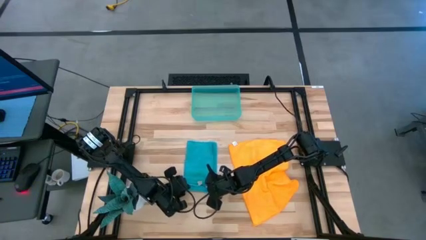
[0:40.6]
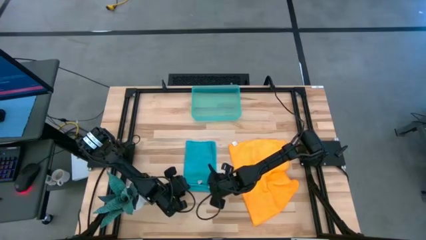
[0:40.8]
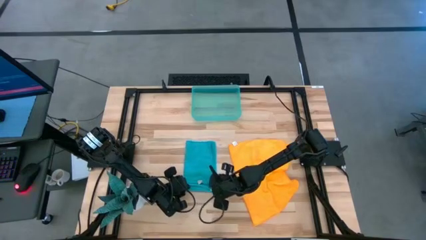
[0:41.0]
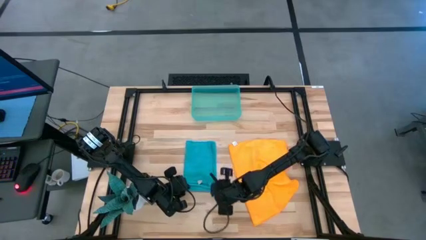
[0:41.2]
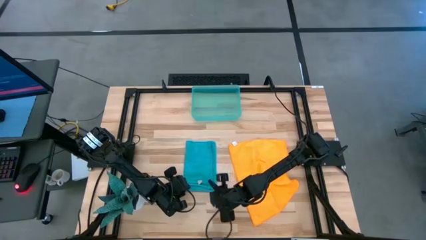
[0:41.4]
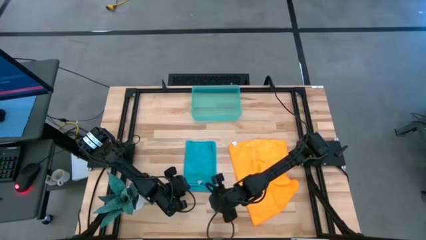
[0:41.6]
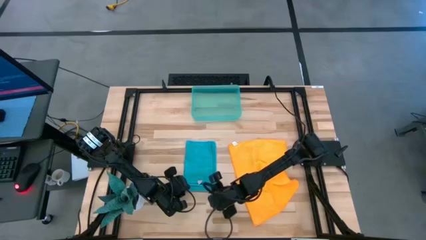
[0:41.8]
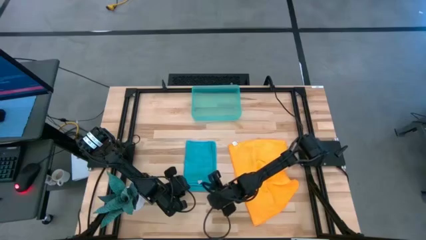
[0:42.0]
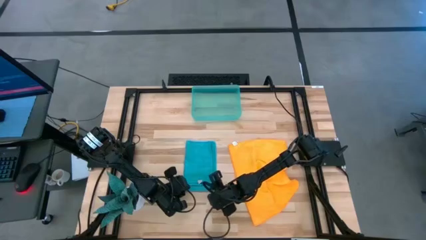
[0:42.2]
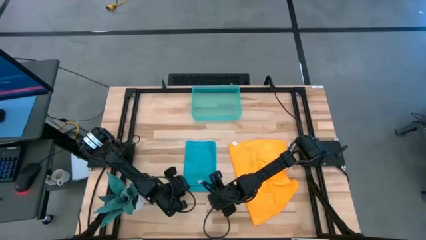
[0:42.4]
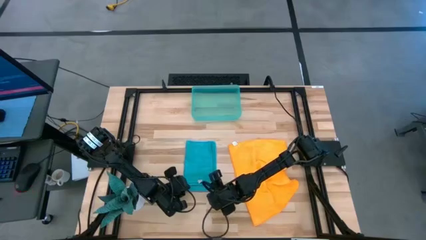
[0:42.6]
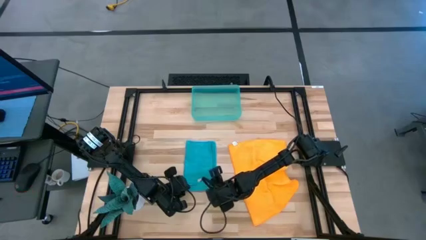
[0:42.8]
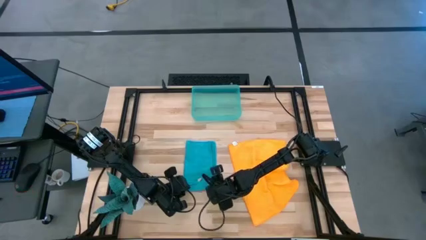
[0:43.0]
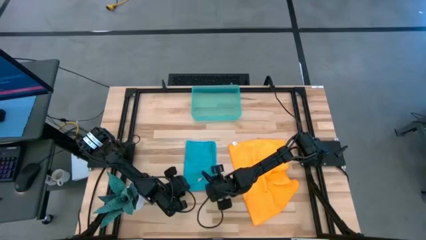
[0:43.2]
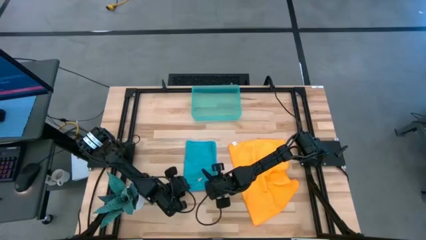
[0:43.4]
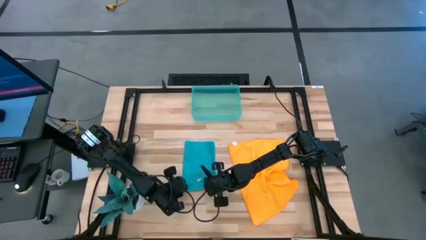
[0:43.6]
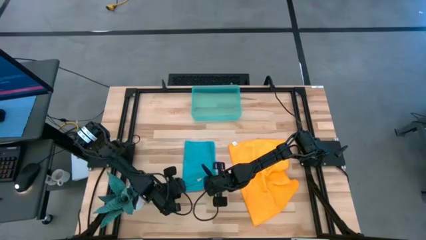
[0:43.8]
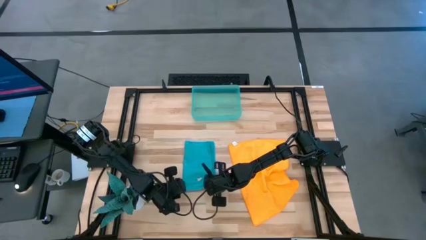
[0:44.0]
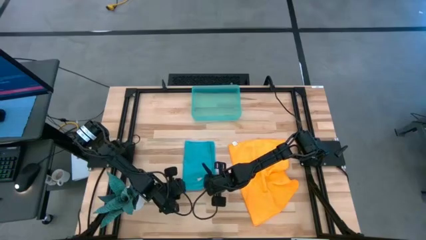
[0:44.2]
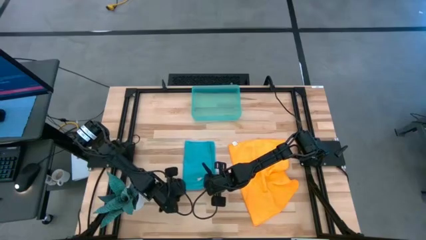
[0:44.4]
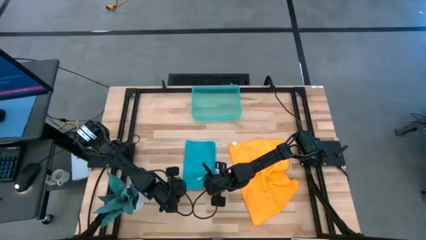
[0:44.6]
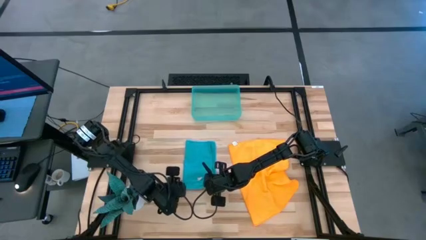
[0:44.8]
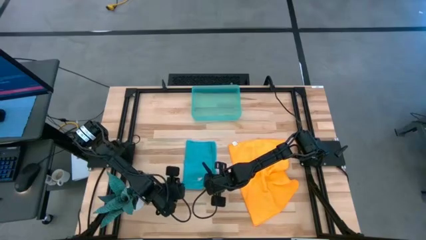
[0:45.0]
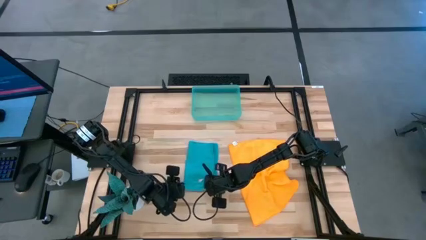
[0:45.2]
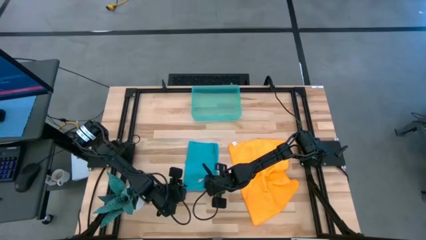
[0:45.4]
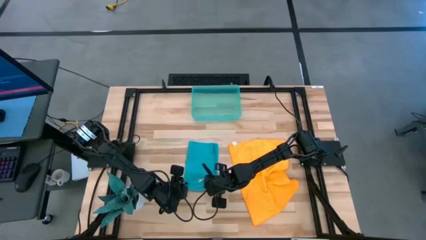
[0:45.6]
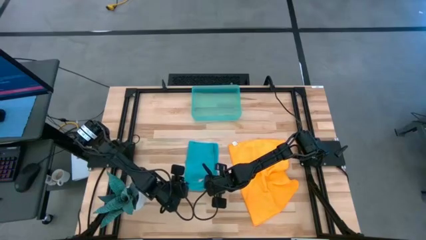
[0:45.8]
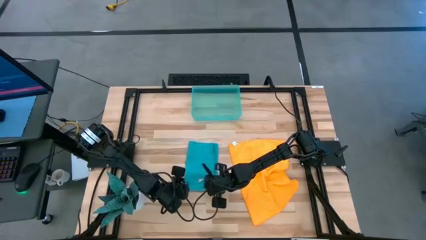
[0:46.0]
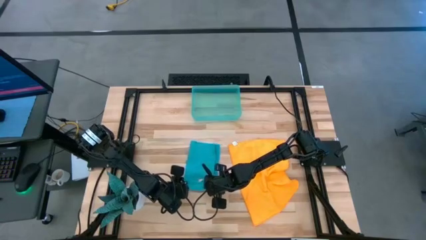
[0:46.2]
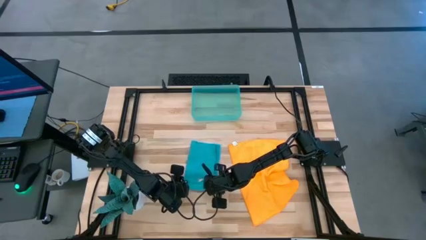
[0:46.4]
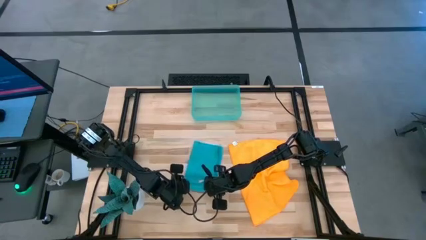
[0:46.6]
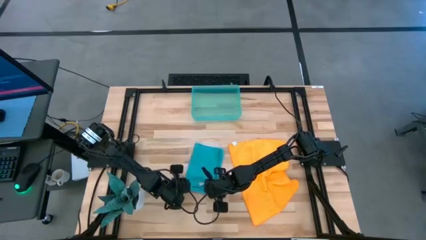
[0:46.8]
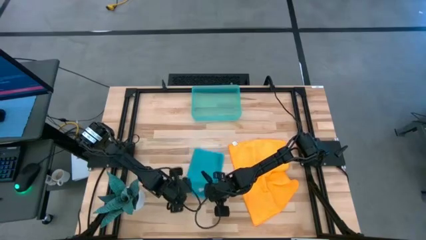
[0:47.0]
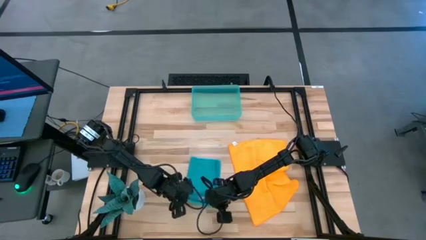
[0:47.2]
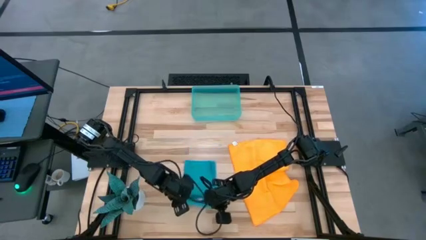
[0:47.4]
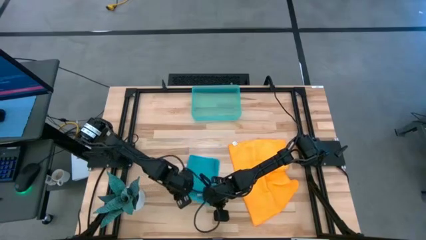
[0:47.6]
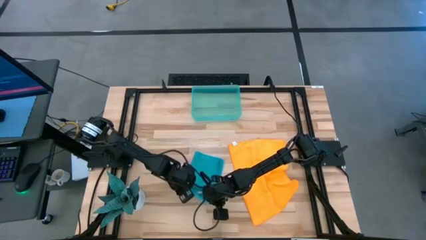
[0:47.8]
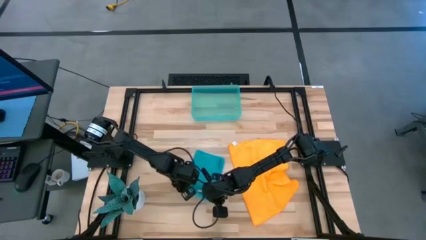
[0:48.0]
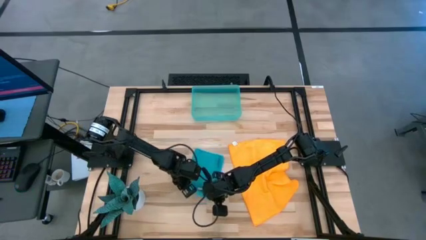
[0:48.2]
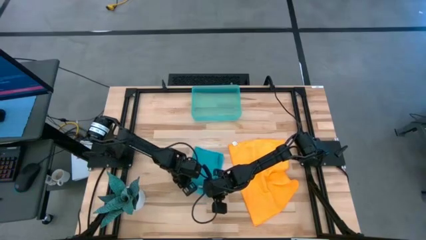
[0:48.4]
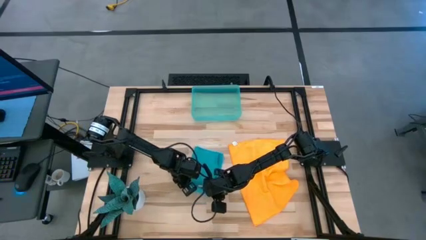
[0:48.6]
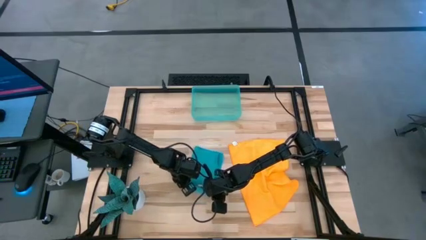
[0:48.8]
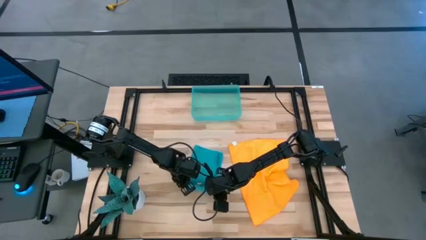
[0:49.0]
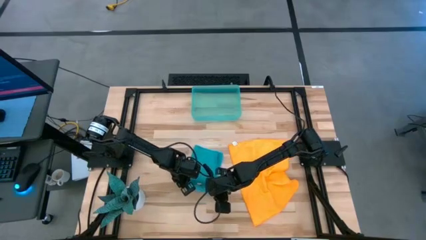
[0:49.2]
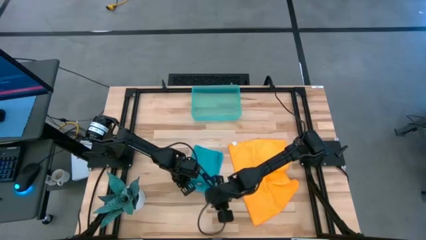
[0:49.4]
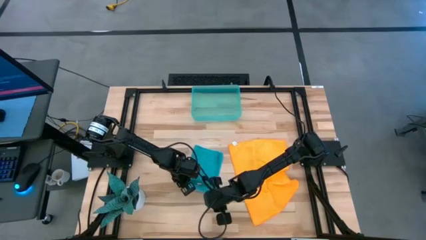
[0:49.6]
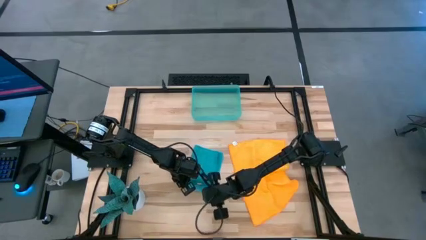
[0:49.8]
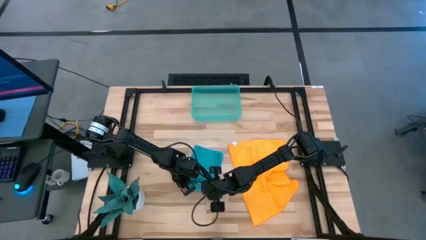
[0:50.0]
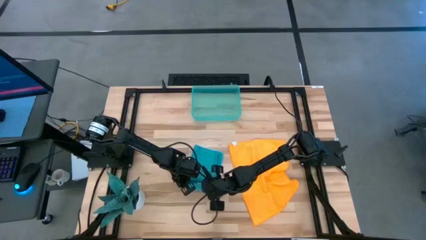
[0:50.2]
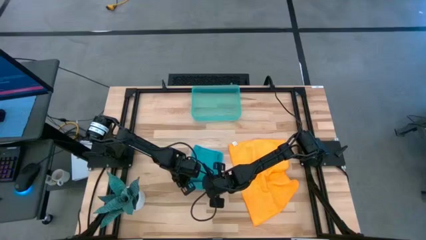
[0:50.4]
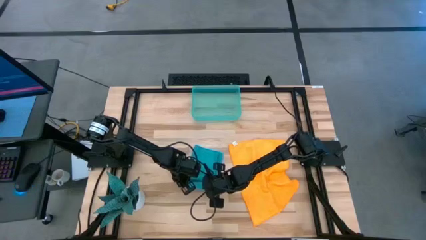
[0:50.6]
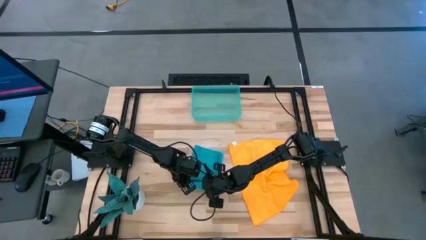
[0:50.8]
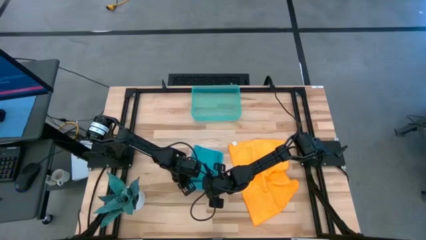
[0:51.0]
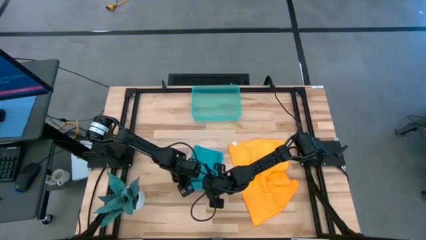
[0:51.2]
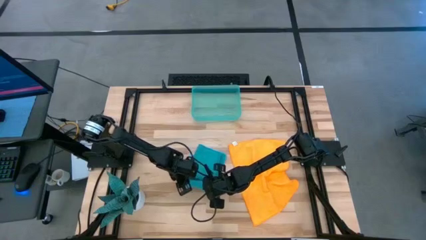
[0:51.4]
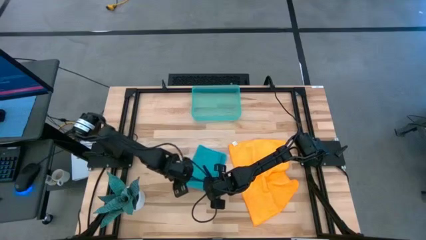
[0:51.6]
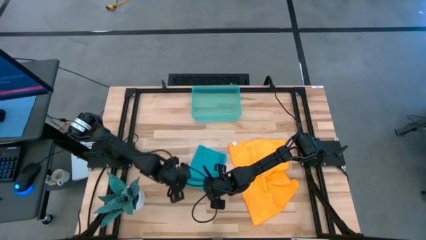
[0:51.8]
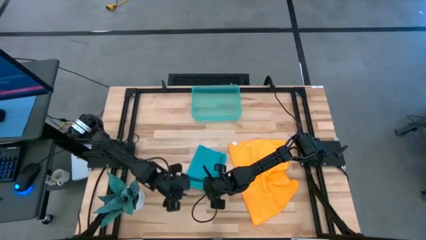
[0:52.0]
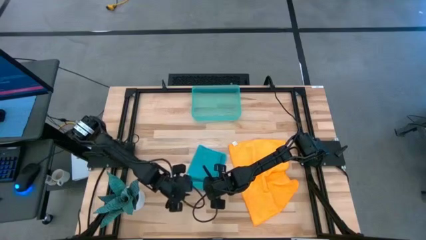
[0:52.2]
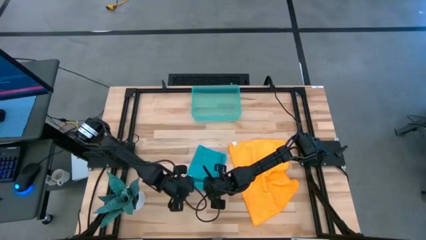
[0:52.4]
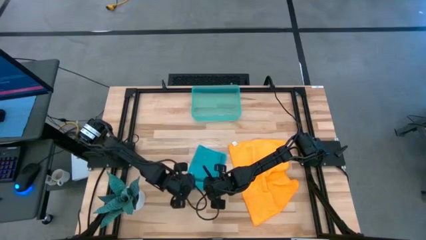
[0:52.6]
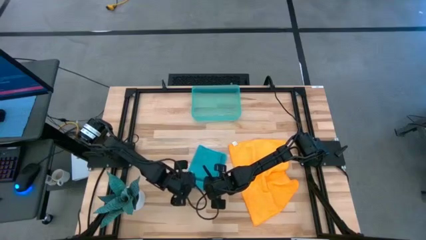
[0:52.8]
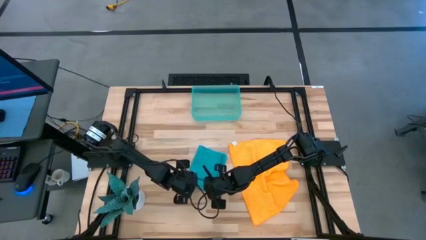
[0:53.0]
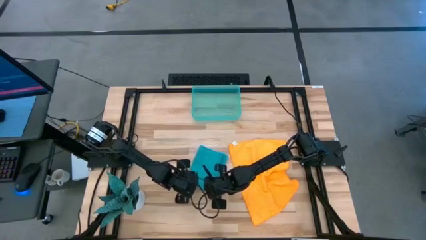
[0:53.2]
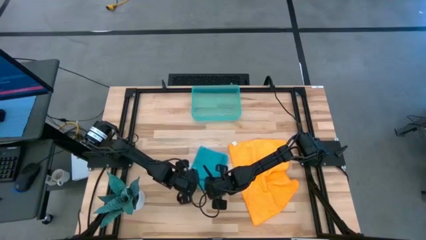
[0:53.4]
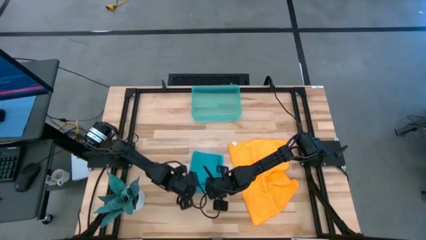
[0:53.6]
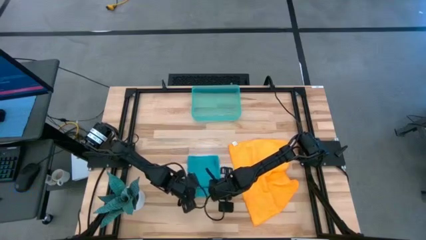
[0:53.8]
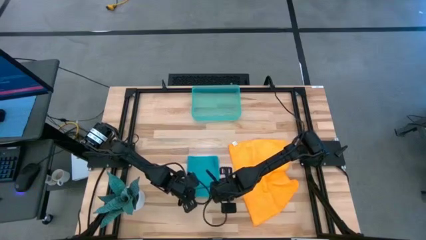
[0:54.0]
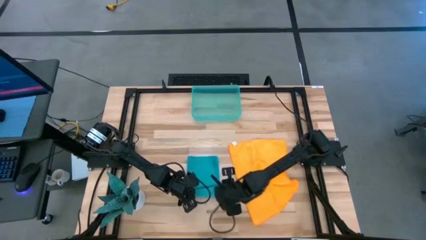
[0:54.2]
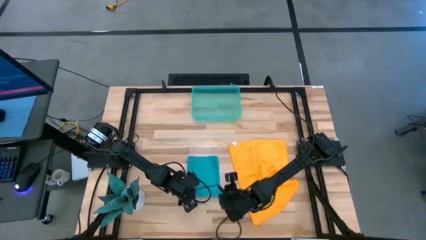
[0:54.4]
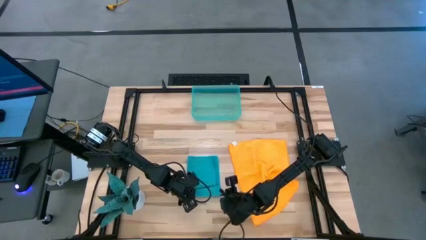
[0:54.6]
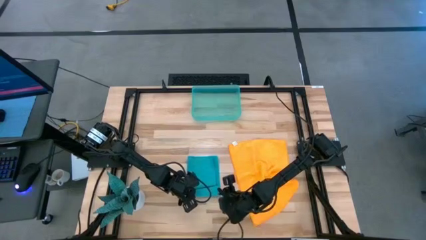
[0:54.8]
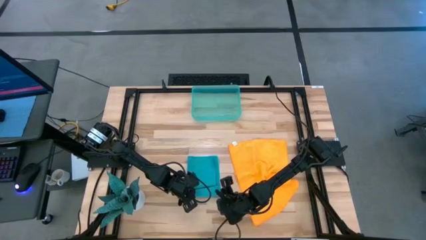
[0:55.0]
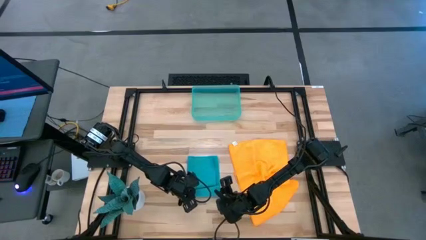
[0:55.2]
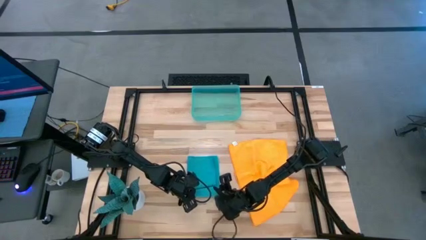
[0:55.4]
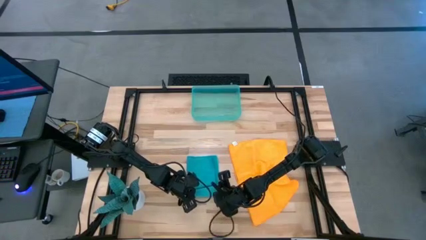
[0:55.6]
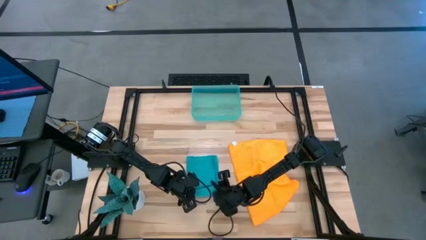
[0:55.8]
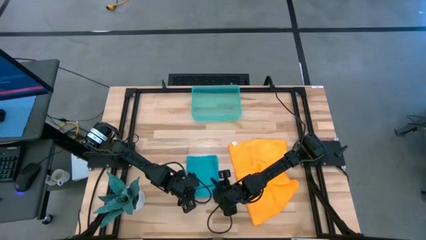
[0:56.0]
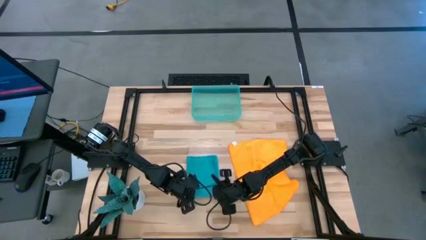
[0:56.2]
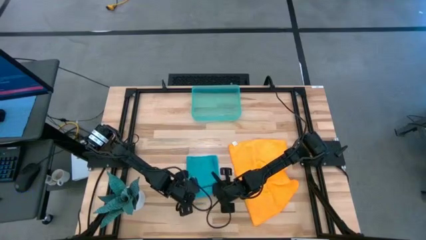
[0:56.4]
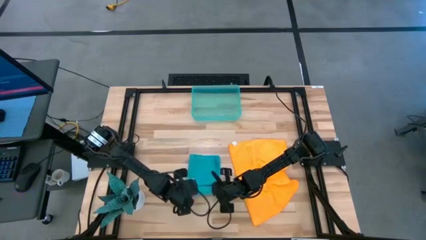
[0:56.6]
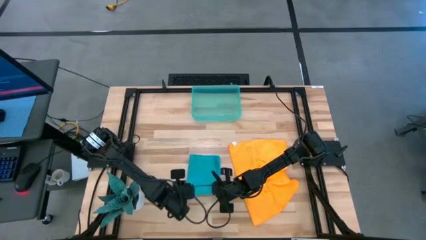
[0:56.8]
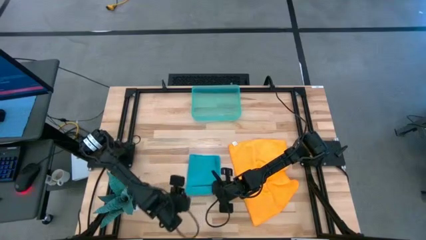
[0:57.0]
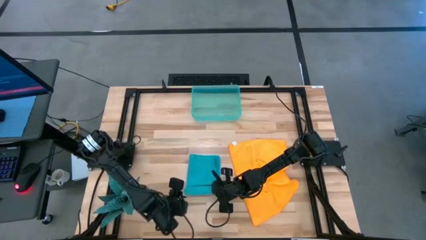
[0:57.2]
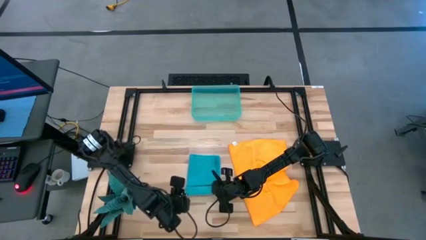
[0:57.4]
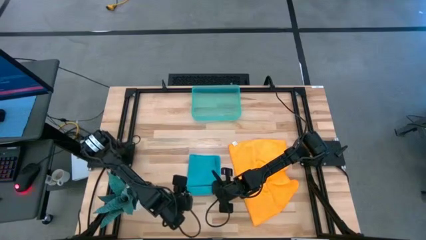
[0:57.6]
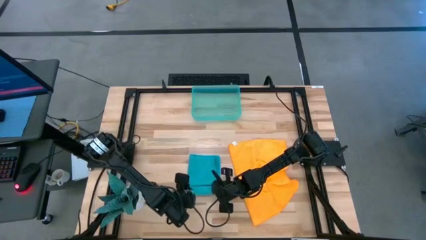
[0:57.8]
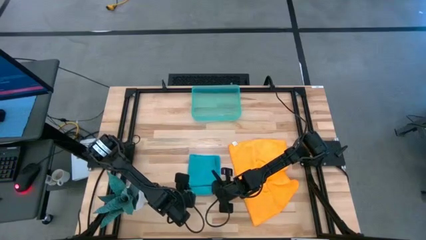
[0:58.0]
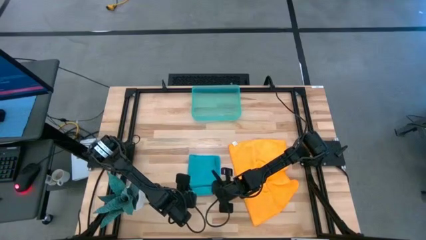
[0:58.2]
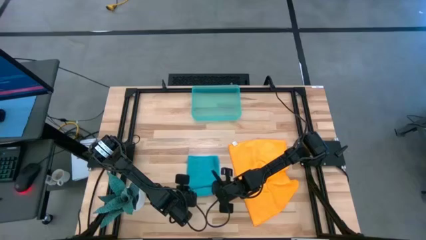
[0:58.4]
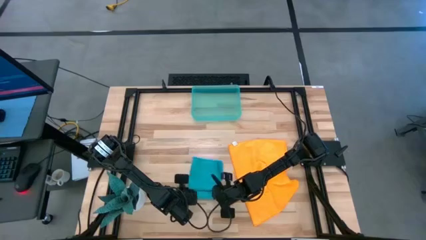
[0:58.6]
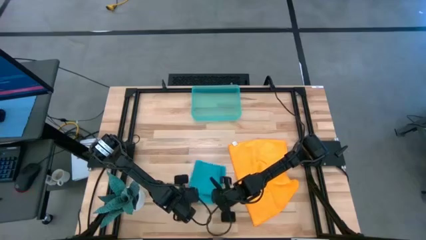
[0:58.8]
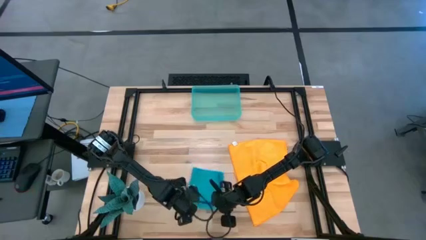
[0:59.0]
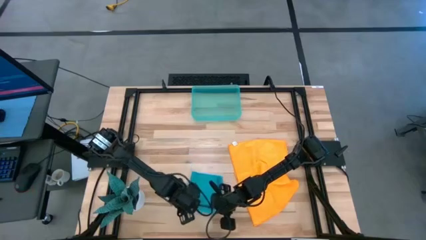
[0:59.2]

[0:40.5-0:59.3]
Task: Roll microfiber towels into tight, uniform cylinder then place into a basket
Roll the blue microfiber cloth
